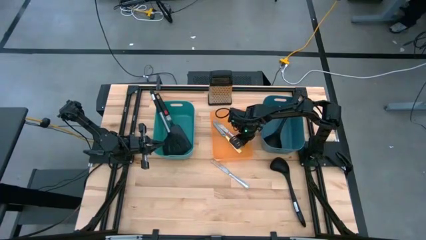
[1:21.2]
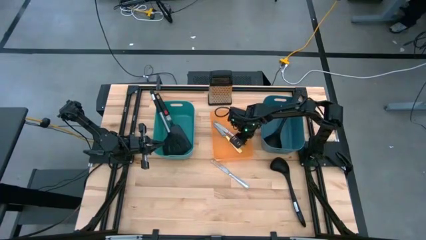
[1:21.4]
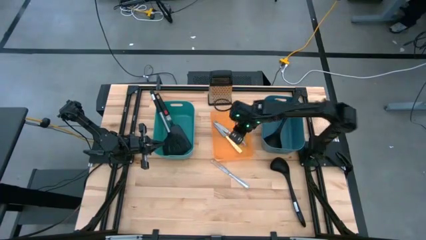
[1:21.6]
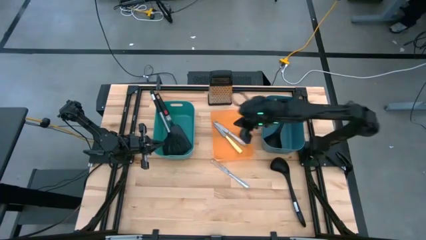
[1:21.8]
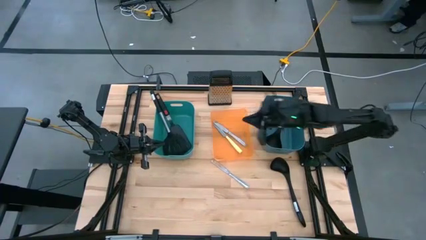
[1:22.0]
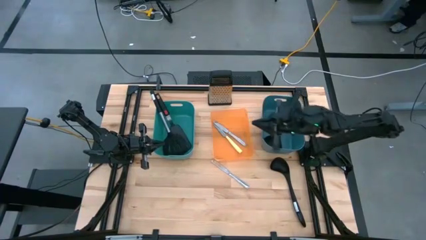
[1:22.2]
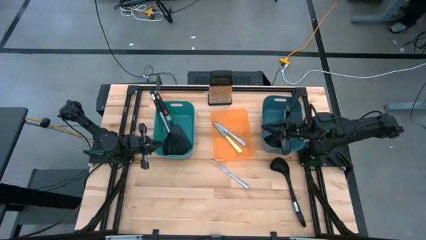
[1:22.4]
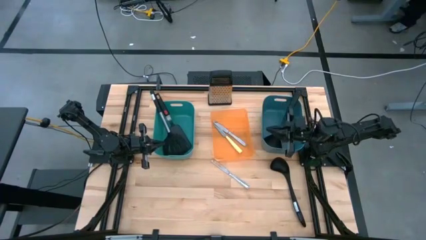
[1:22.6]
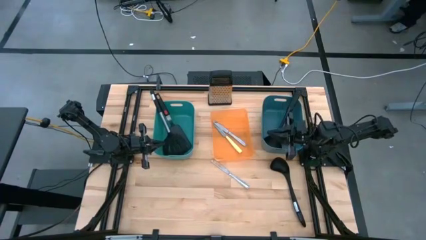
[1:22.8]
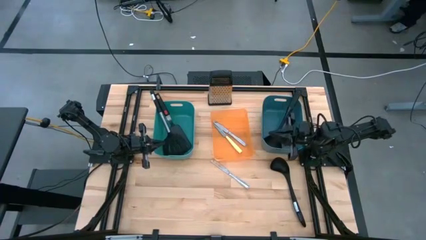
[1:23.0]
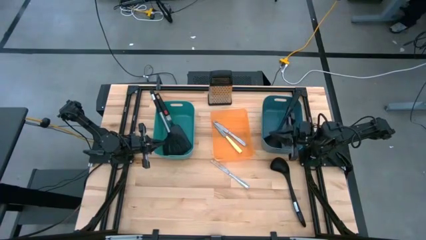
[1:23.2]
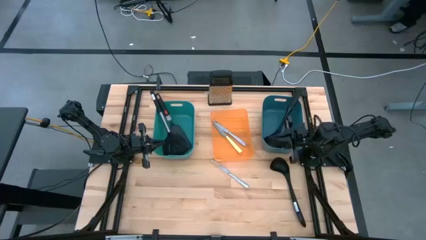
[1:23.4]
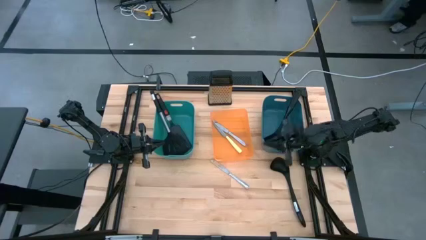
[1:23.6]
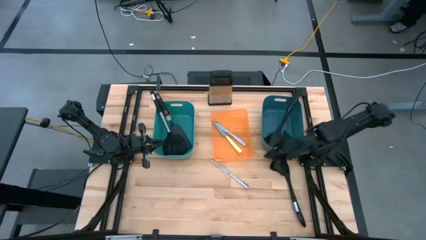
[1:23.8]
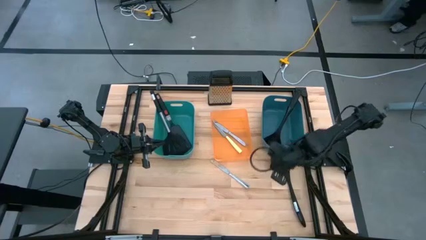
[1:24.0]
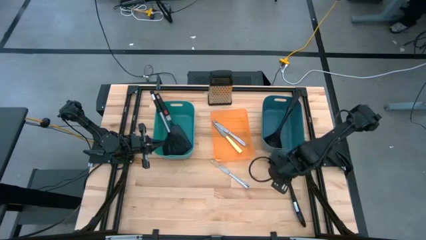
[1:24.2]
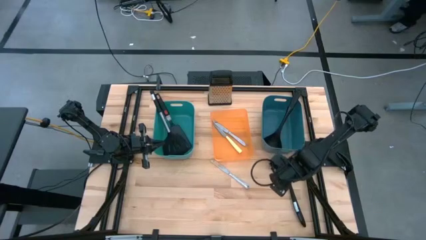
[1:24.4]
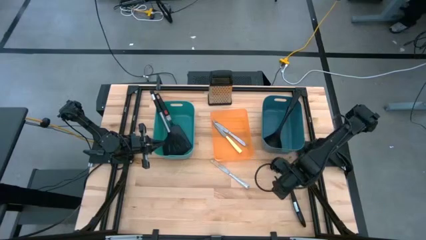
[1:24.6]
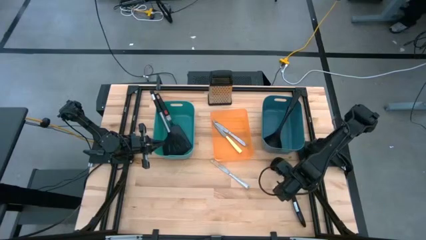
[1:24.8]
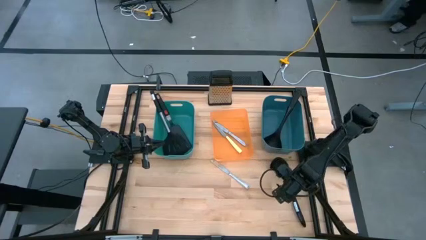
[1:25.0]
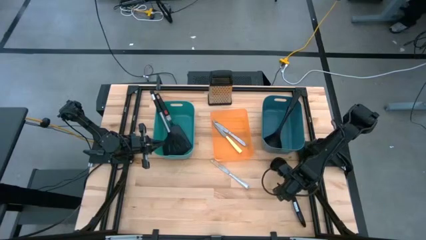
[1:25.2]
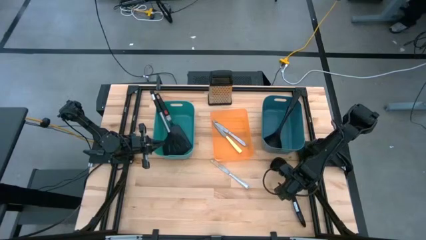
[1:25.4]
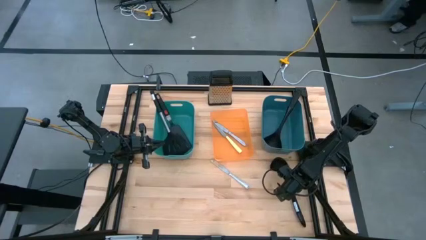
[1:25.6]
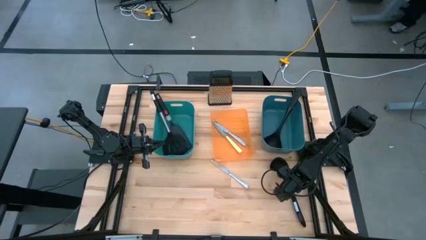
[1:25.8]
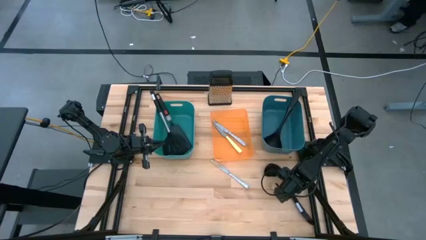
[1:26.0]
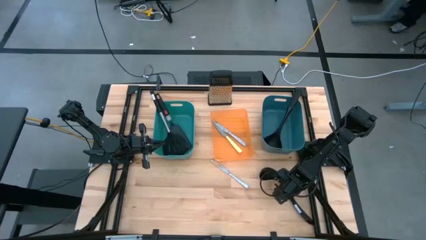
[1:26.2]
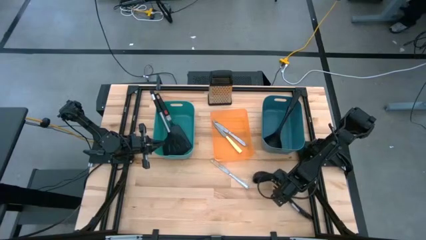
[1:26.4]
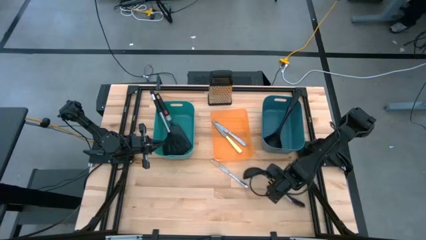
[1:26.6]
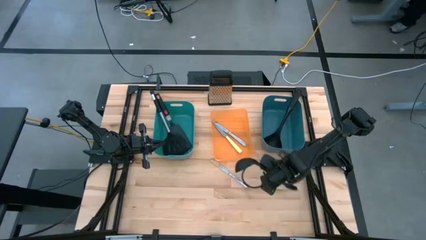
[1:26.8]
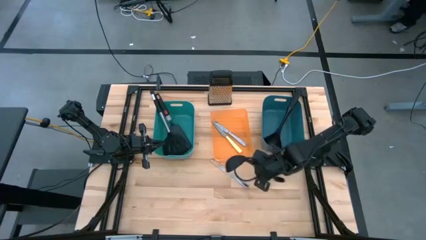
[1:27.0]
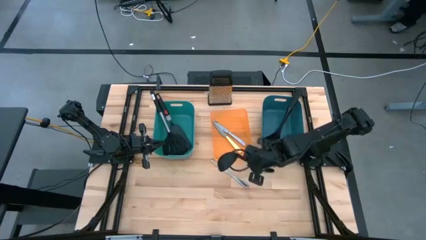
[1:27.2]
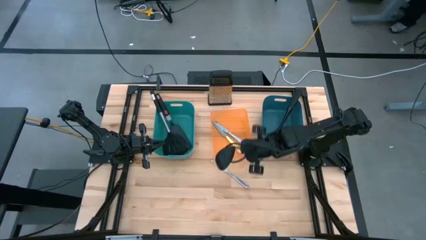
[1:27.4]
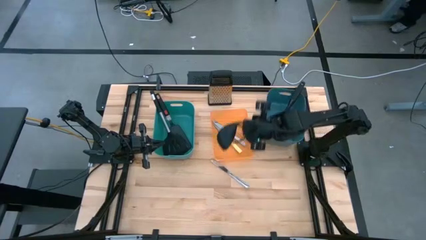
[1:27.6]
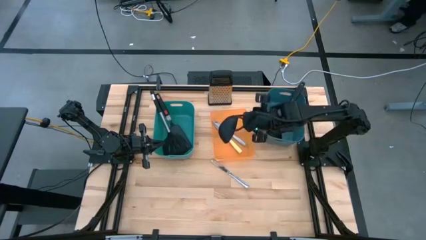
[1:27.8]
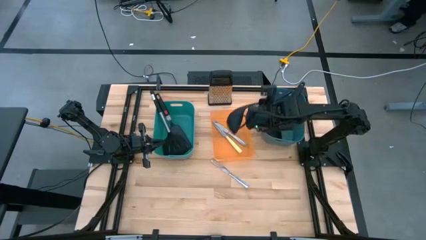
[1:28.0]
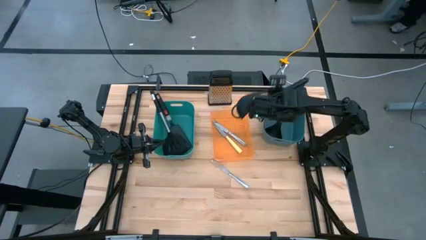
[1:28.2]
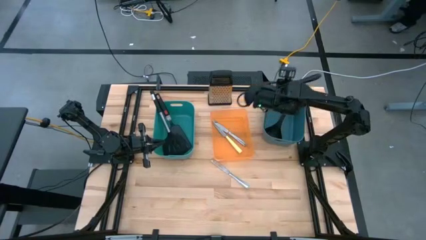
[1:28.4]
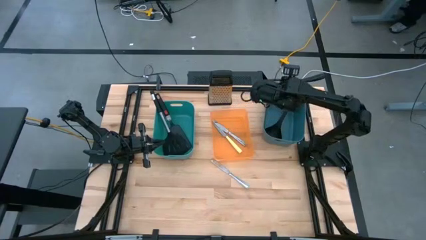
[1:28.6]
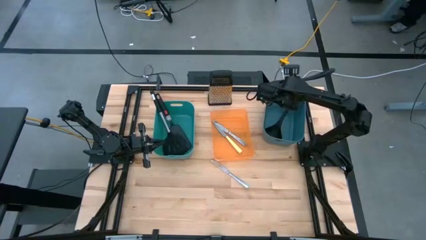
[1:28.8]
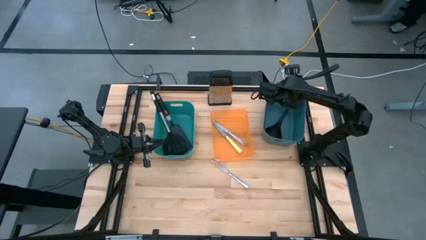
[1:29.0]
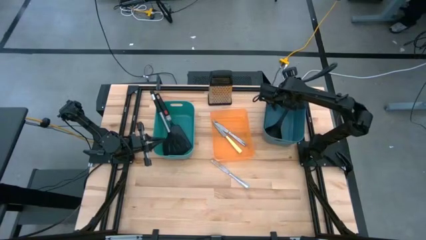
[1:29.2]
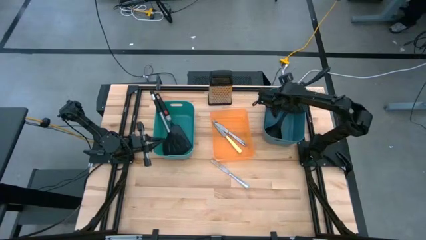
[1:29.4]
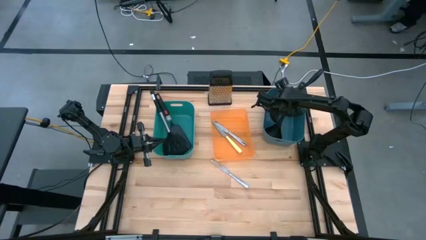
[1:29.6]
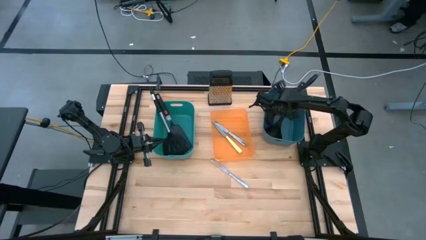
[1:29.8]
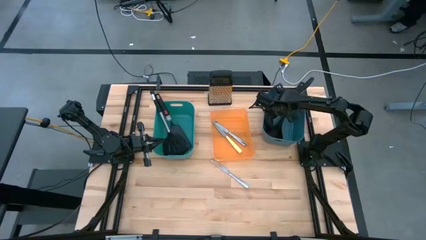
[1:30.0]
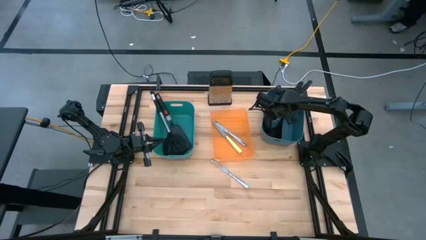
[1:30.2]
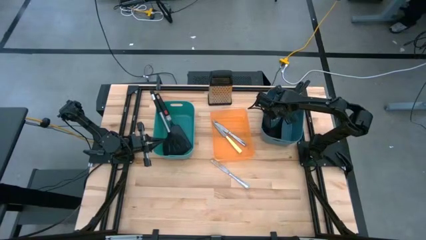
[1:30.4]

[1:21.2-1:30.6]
Task: Pick & Place Kitchen Items
Put the black serving spoon into the green bin

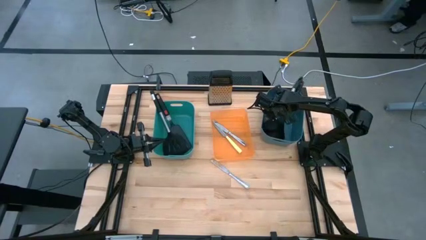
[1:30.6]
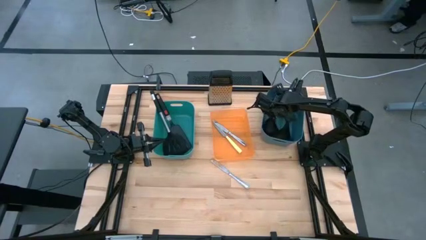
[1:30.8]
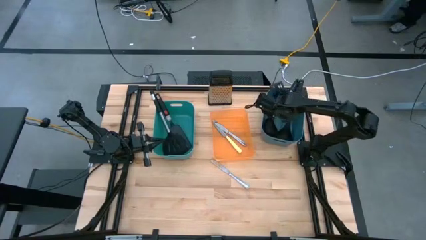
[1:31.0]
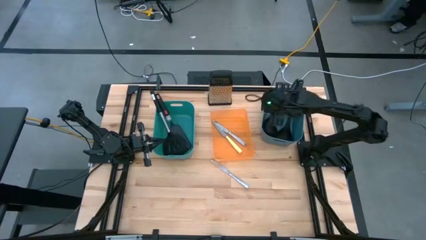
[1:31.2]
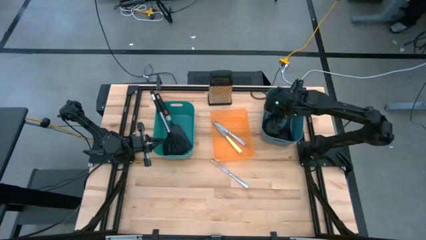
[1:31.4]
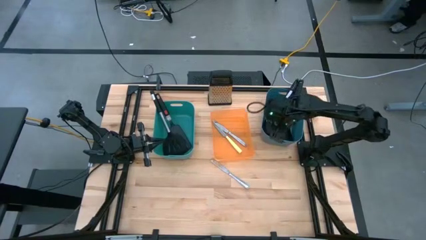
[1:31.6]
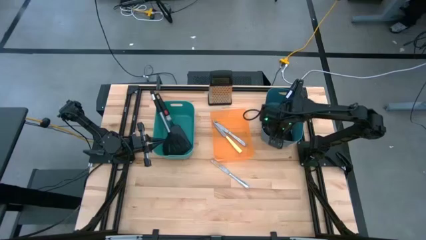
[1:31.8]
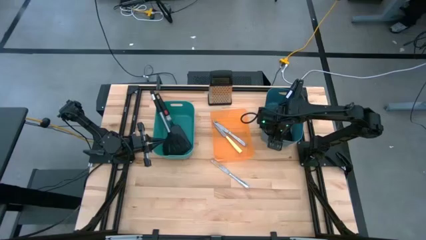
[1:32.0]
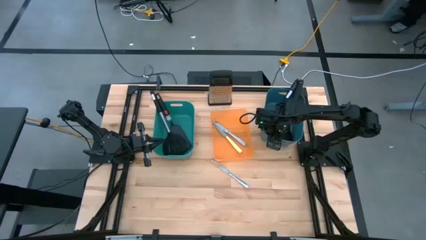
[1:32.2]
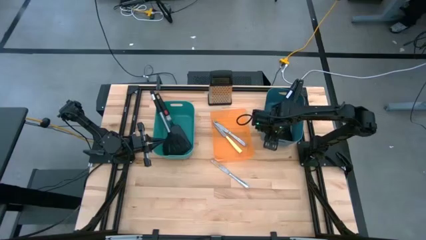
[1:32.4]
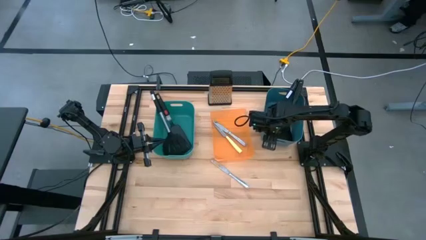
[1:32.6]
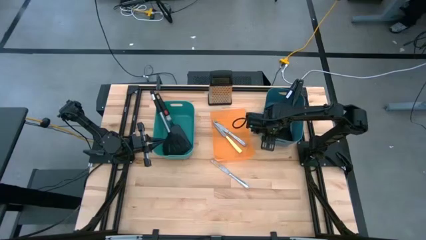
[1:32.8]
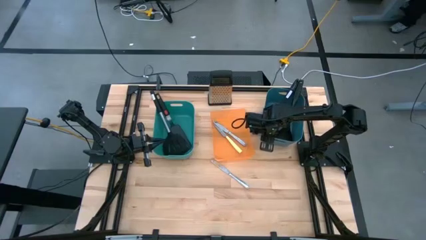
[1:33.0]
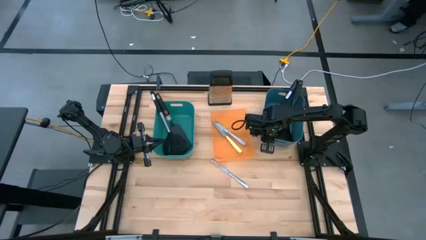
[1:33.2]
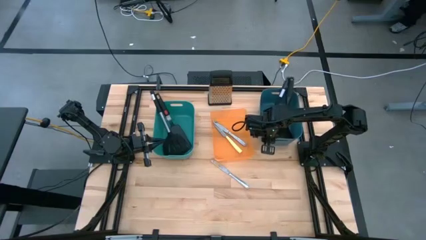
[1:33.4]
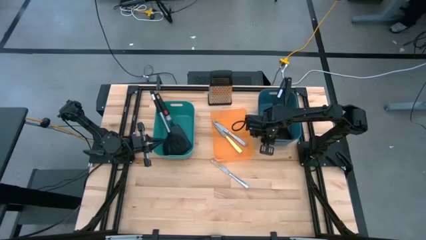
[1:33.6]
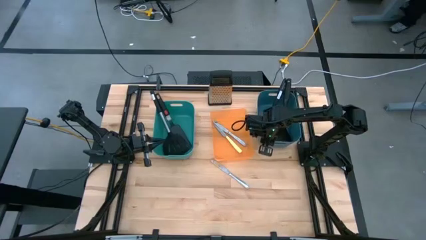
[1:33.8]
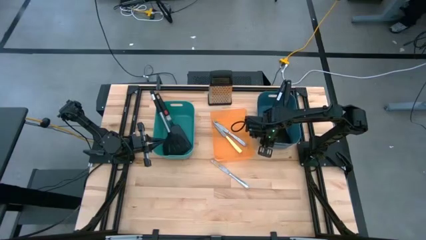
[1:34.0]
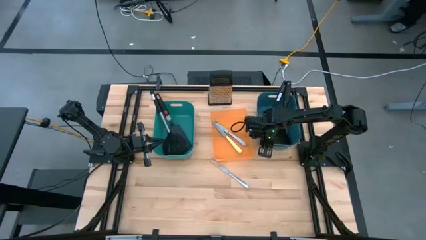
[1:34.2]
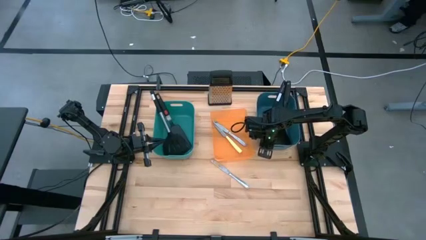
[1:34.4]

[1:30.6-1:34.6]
Adjust the blue bin

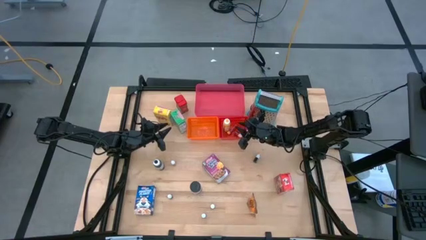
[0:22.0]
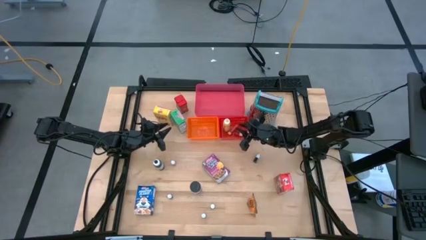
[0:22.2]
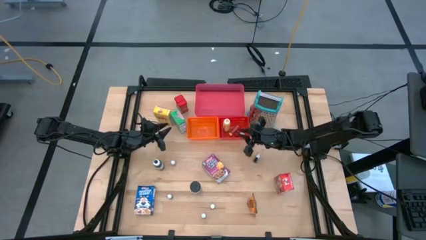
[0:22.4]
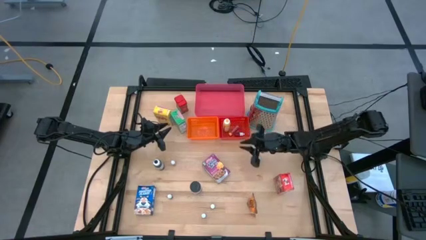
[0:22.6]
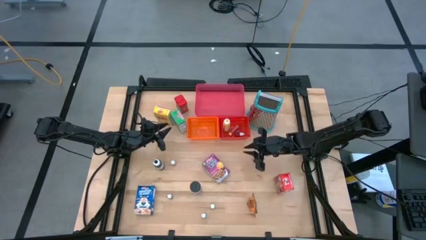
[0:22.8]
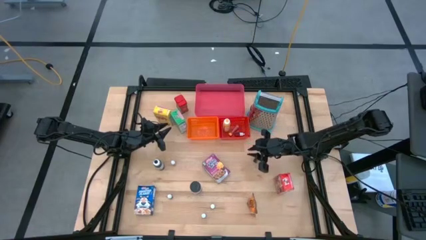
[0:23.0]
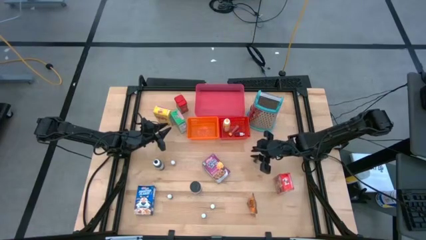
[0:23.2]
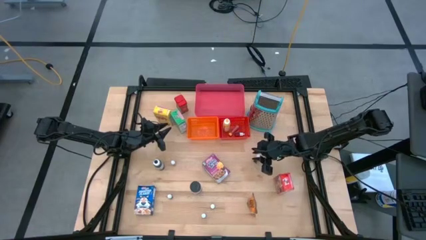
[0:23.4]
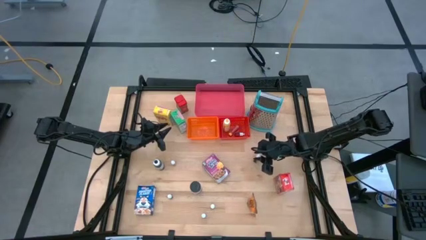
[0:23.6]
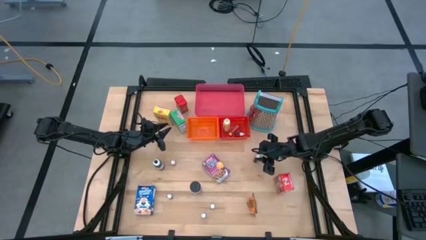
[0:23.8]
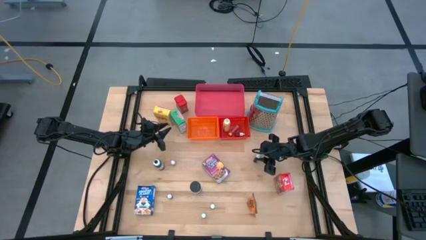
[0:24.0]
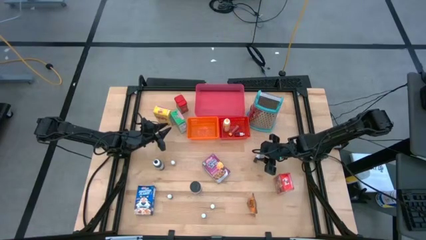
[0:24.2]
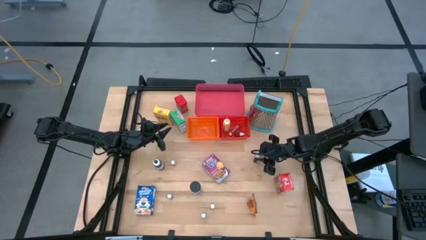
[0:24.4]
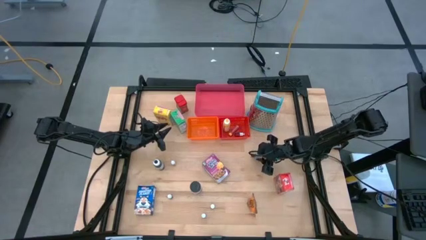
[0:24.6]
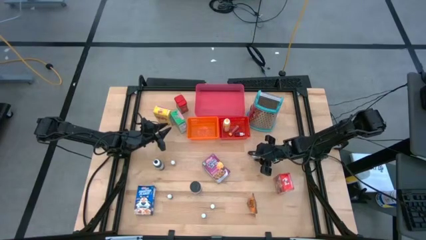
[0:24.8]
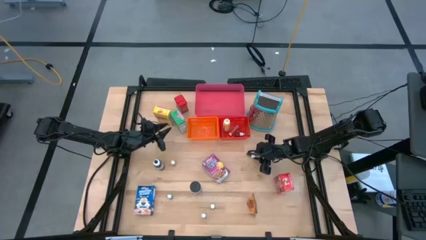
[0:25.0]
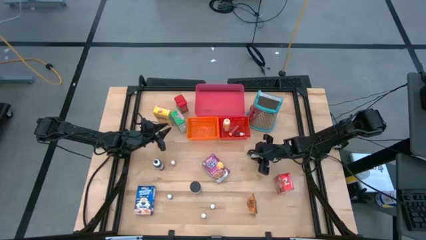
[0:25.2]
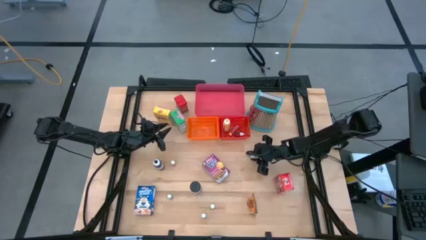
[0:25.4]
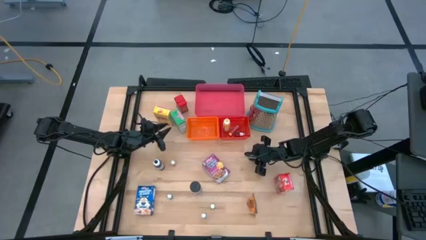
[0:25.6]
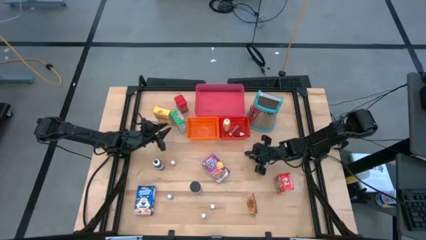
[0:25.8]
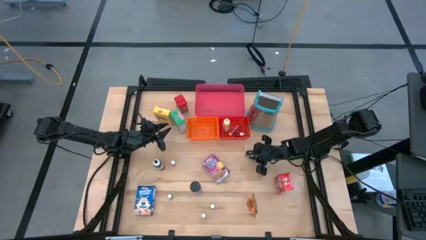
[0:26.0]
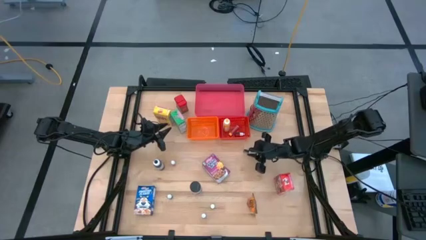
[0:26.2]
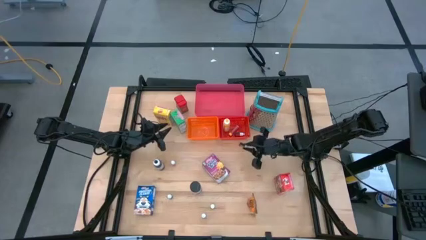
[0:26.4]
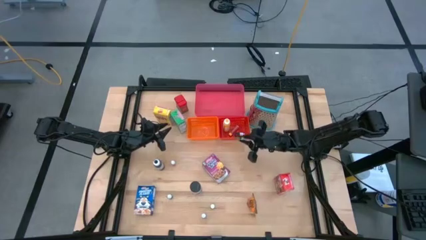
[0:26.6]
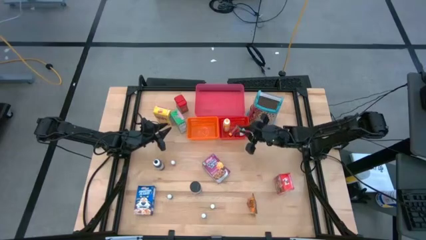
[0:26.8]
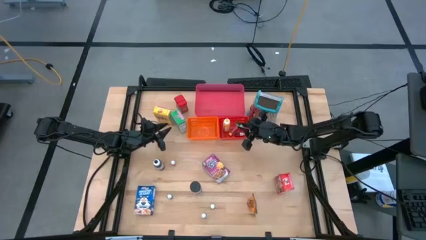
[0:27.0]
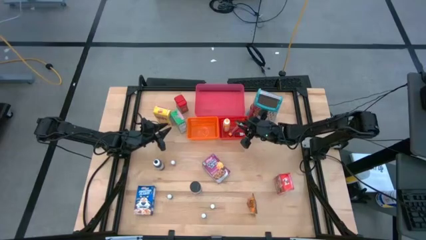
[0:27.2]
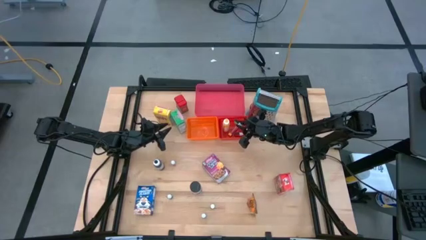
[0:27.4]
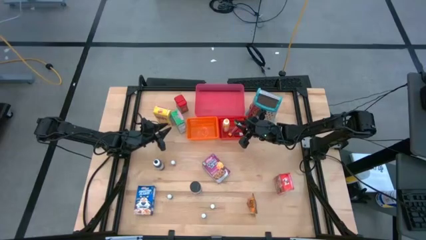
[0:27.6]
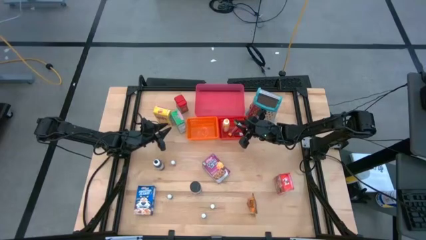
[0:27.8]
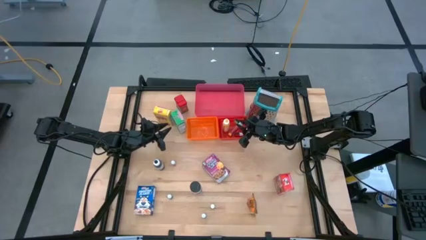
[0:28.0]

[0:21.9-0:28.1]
Task: Pick & Place Kitchen Items
Put the top green food coloring bottle into the red bin
